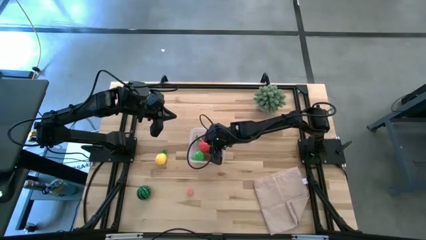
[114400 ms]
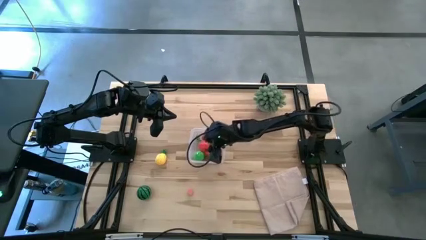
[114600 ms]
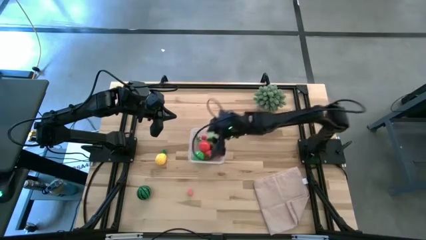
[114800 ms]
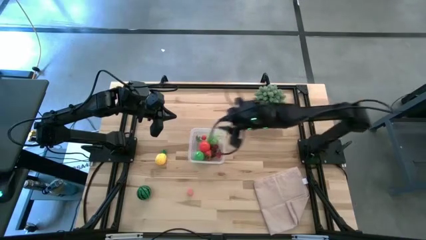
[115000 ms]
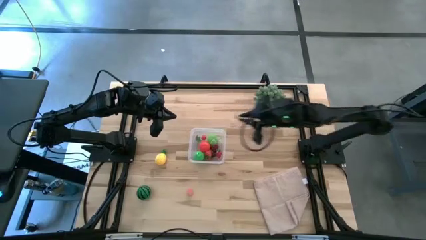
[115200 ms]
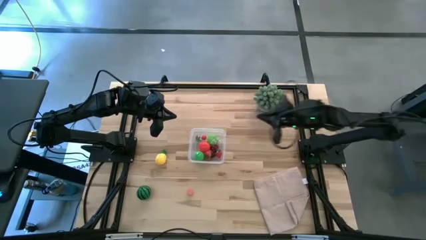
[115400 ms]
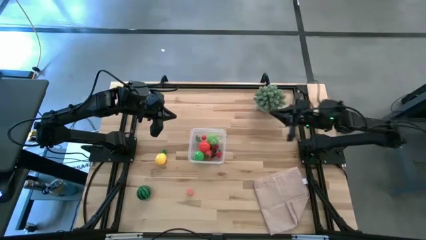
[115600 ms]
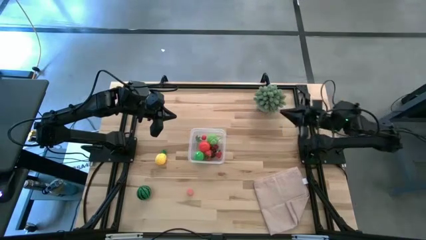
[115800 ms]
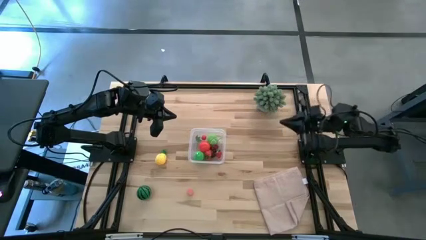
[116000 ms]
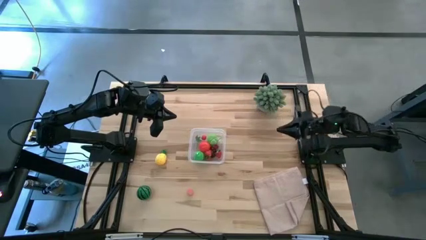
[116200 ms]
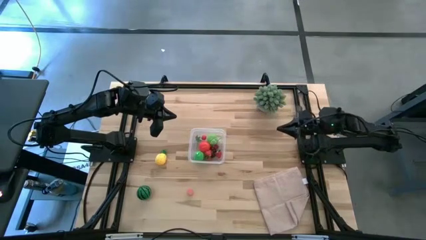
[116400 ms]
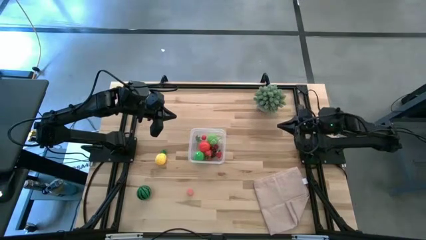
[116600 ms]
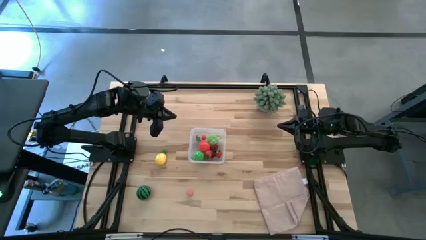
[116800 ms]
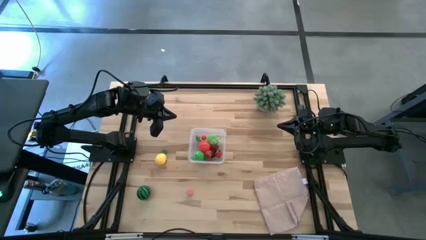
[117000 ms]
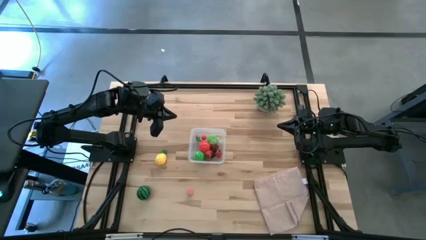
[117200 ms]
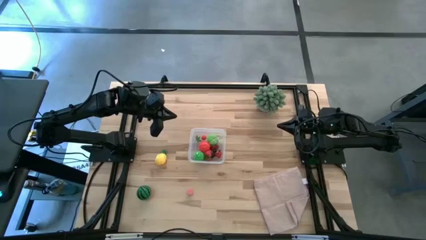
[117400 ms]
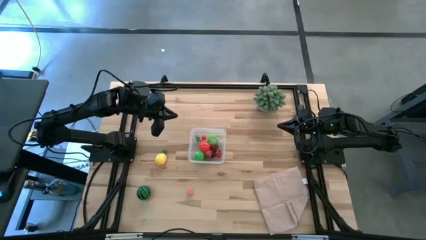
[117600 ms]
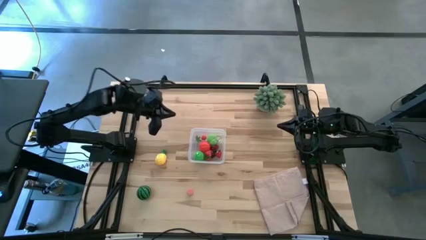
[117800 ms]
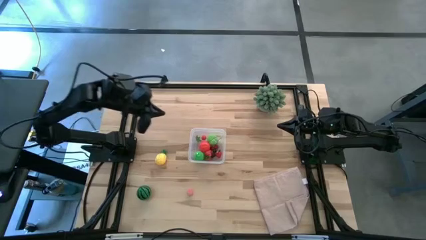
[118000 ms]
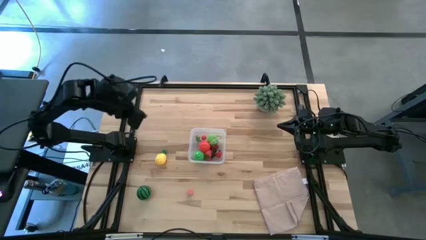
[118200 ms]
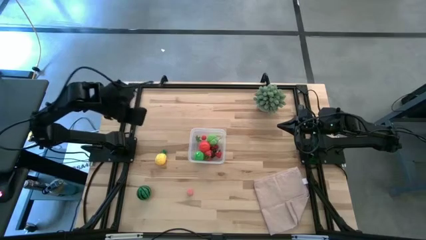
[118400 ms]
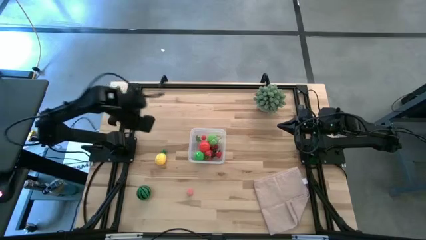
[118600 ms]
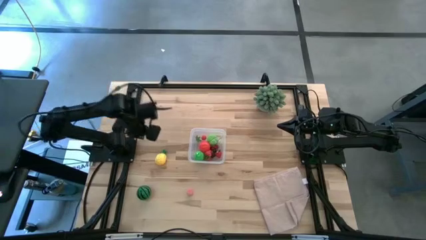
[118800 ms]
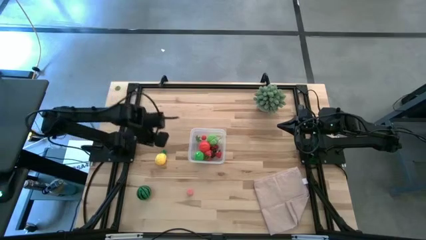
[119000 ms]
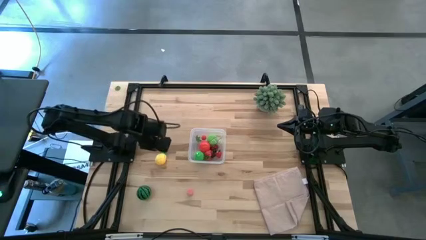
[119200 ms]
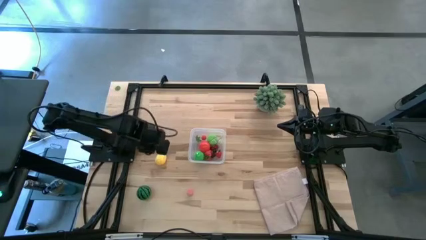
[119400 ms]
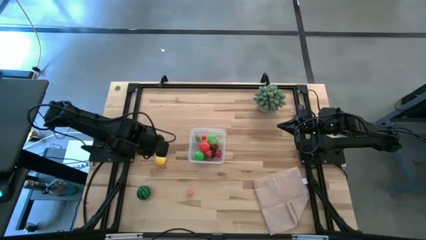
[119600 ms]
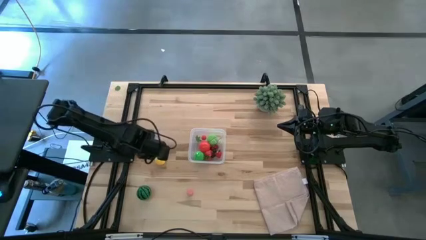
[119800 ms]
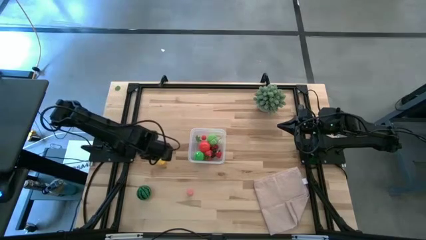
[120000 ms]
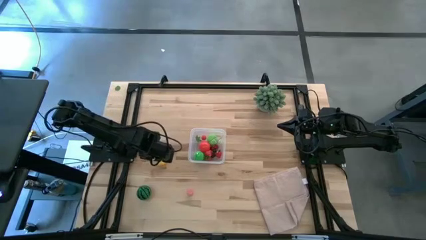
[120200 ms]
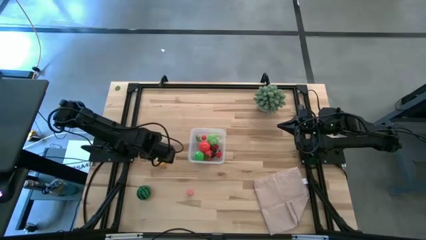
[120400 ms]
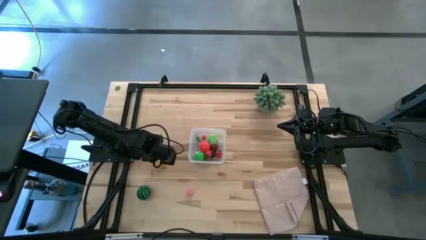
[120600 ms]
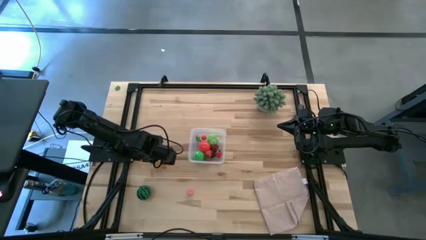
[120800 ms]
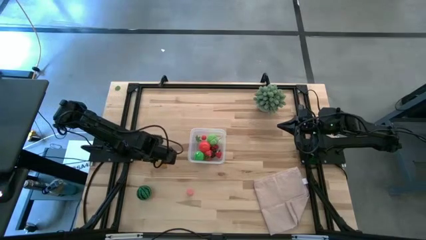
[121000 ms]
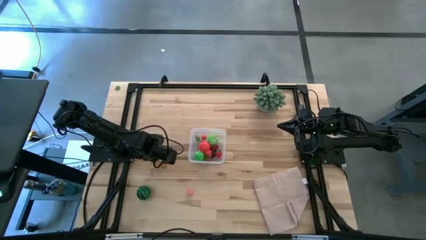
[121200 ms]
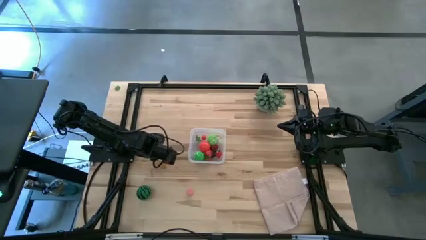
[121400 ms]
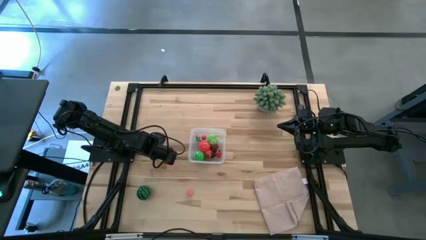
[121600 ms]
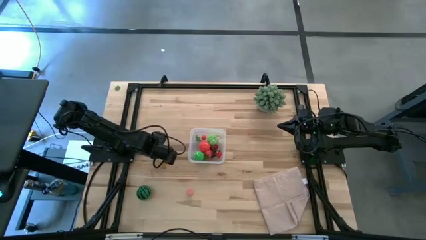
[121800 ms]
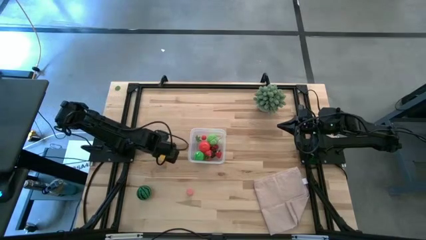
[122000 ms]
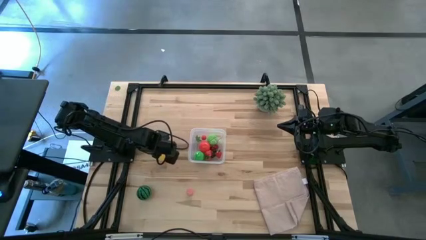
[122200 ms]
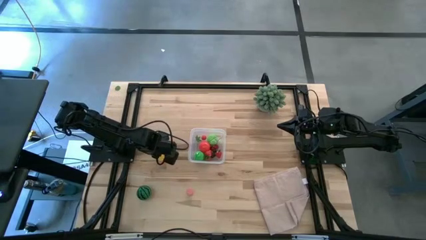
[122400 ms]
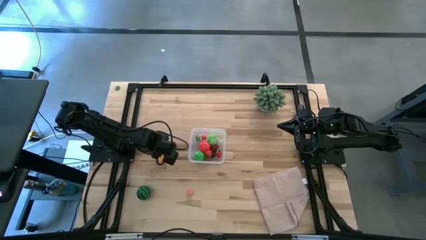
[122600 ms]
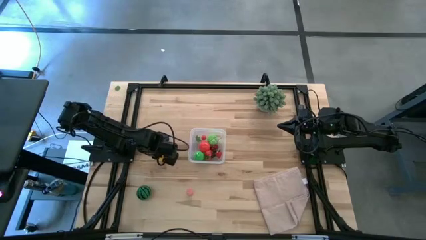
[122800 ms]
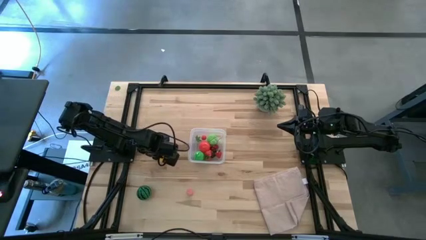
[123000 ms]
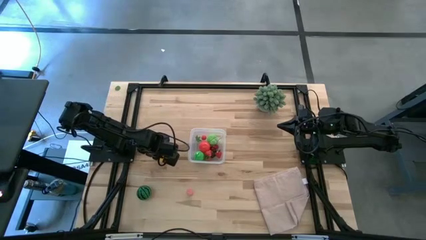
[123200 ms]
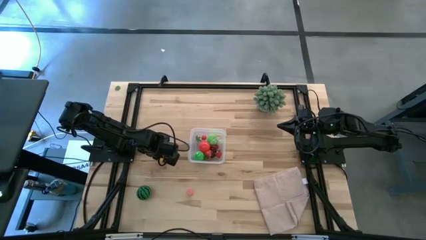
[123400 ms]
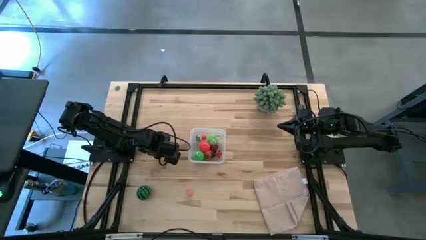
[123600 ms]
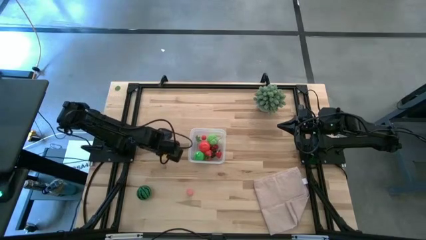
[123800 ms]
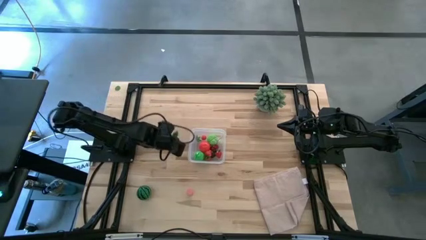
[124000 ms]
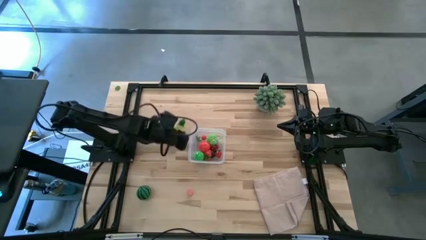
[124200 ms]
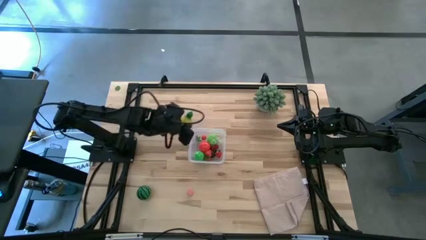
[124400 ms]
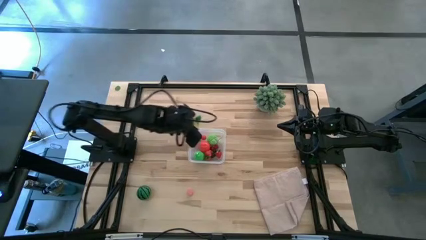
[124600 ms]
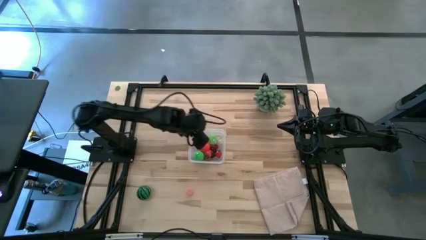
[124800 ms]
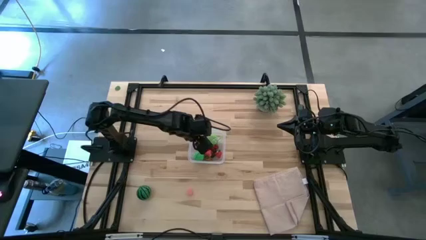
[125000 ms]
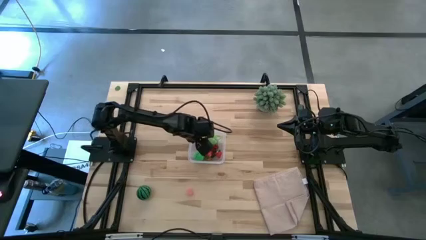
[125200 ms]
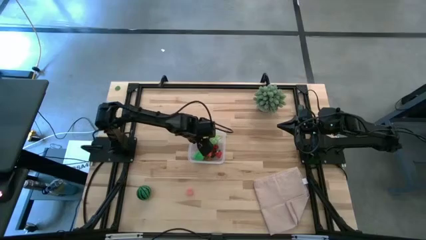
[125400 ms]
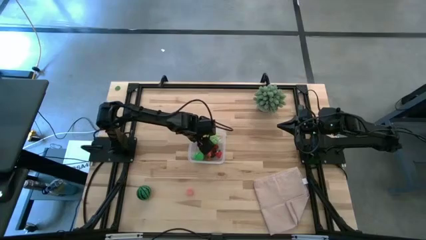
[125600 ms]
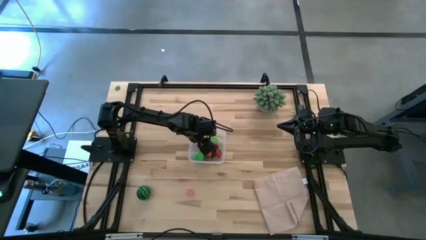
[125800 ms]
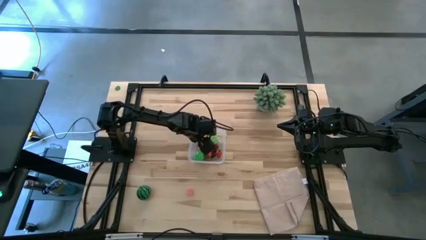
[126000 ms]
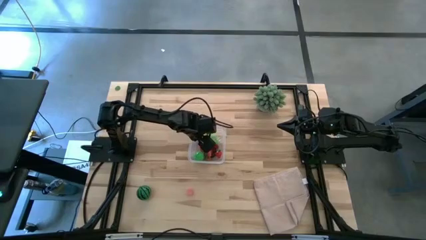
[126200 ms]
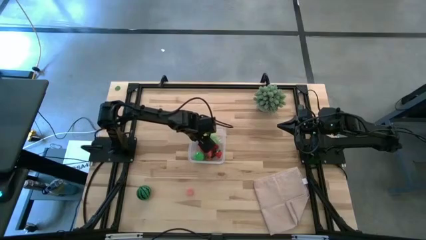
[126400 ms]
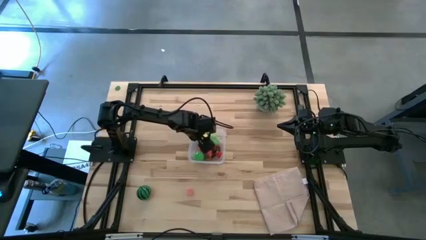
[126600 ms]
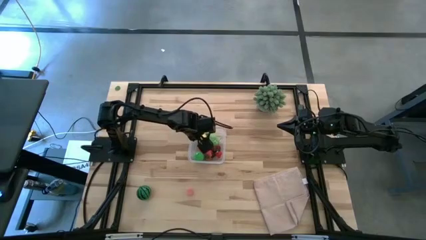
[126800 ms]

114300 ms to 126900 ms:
Task: Pick and placing Produce into tupperware
Put the yellow pineapple into the transparent bin

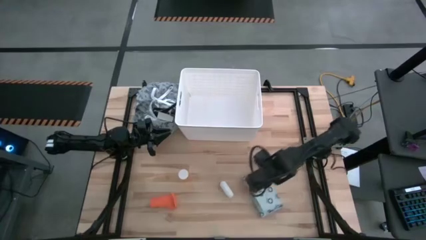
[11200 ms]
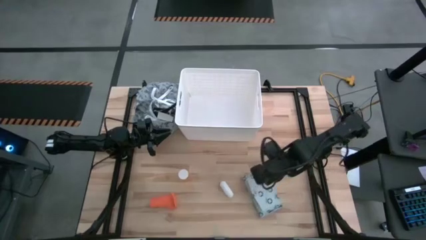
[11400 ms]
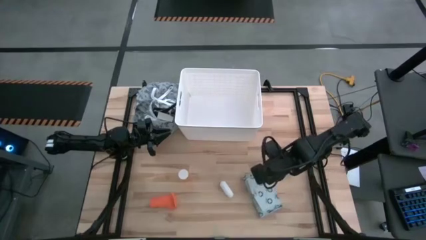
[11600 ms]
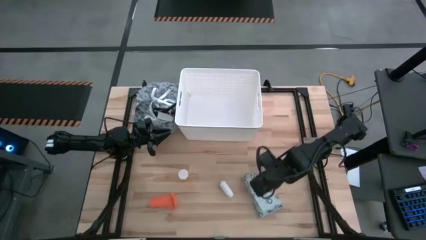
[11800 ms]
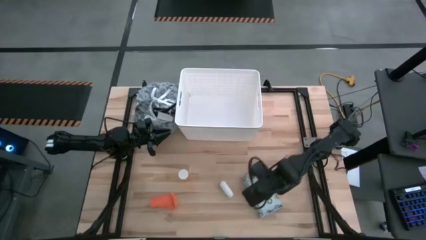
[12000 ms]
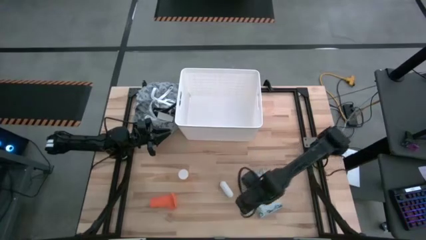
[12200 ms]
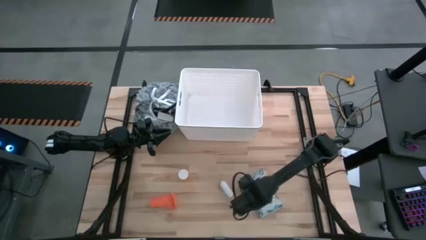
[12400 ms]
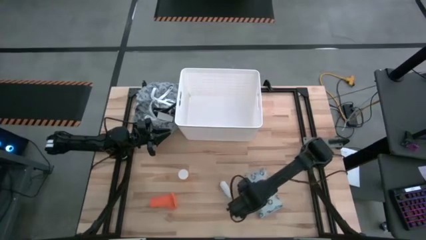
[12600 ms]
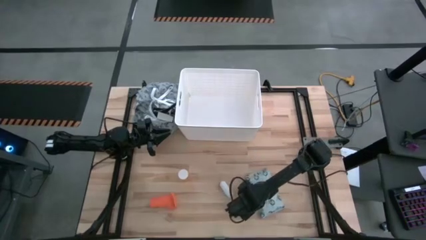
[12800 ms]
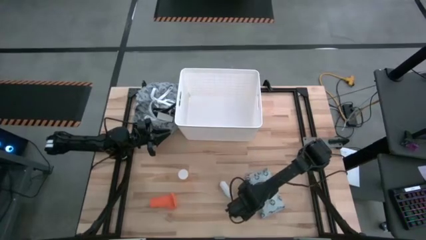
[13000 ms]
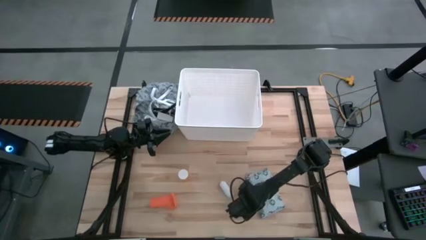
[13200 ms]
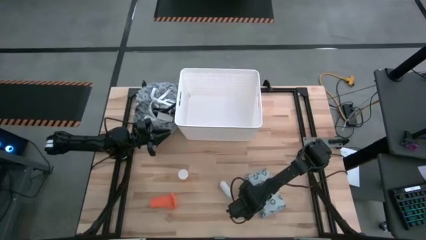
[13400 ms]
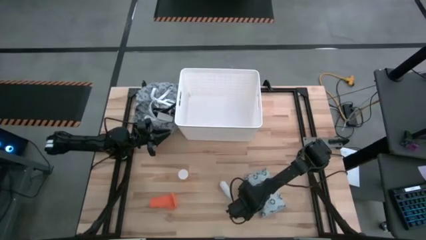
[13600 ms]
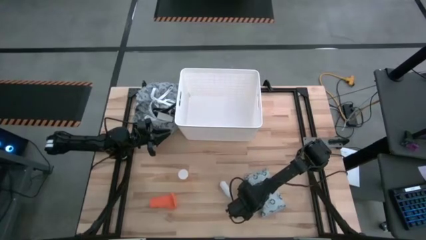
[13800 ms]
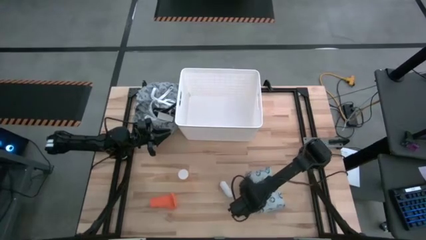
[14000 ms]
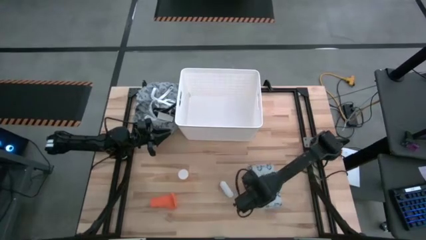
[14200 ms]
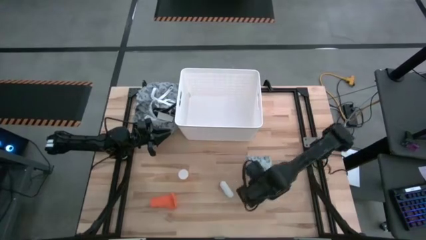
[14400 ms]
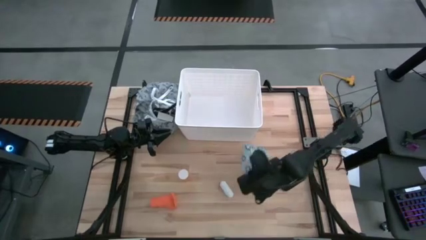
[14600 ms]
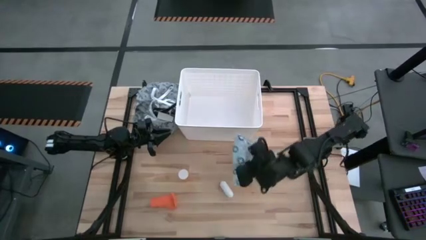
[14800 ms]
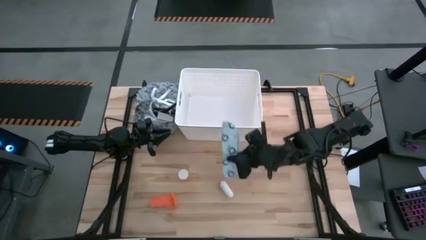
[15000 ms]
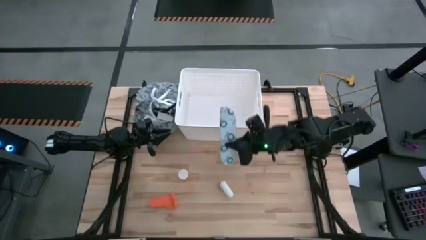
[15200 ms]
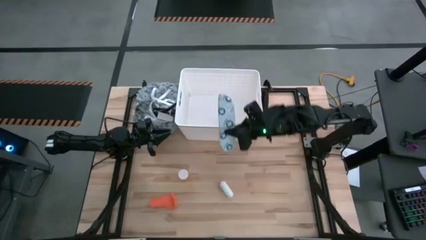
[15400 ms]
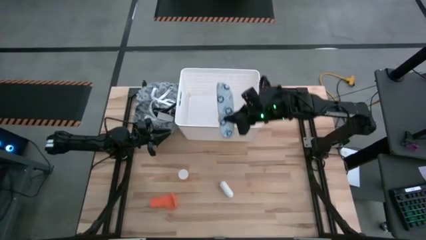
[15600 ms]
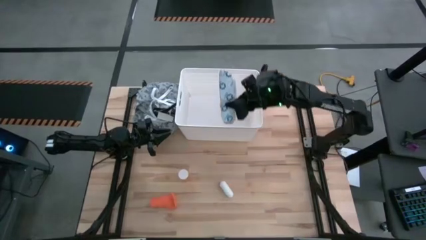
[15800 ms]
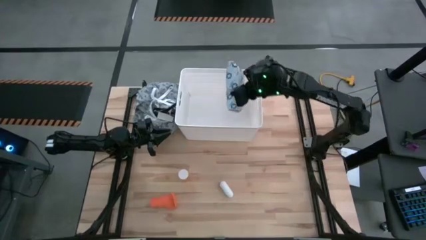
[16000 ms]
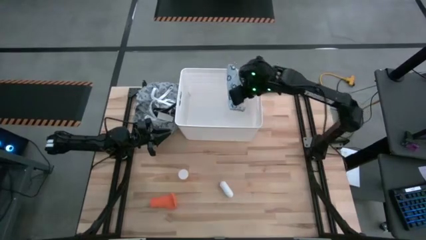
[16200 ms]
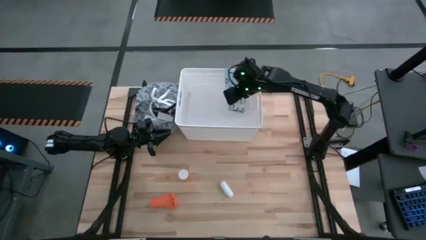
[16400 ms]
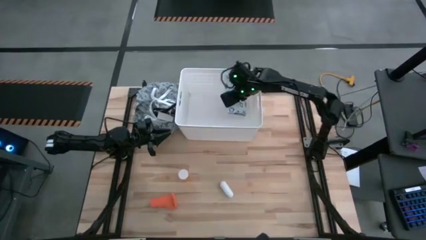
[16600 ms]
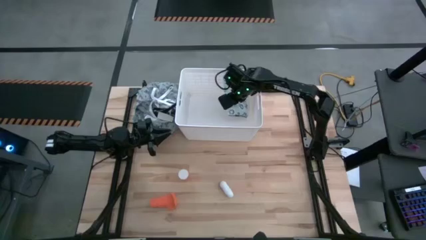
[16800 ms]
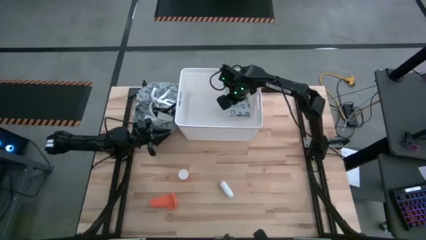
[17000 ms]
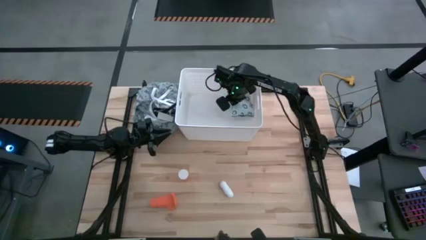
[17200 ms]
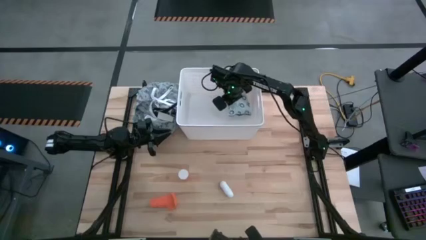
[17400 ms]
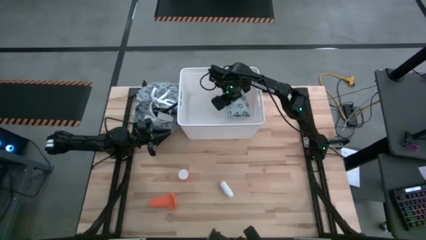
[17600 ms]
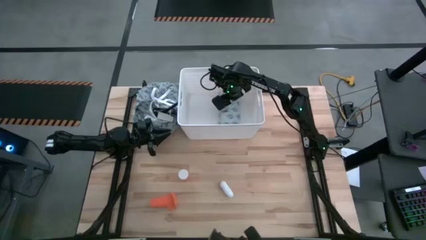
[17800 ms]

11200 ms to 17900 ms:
Task: Pick & place medical supplies in basket/bin
Put the light blue mailer bag into the white bin
